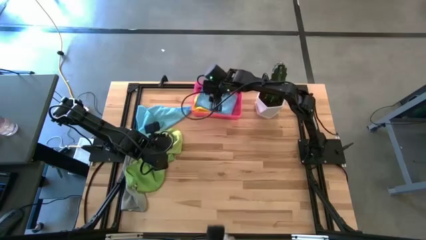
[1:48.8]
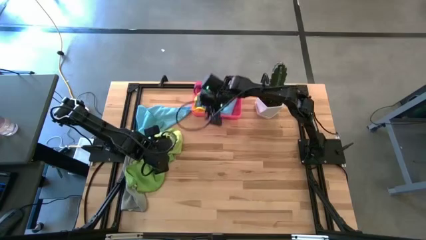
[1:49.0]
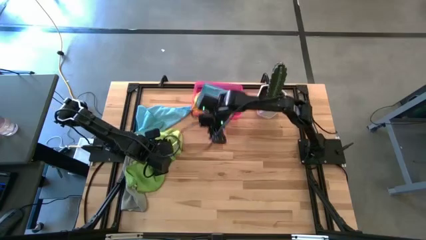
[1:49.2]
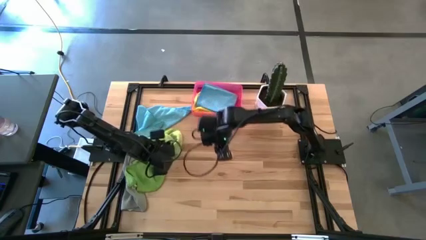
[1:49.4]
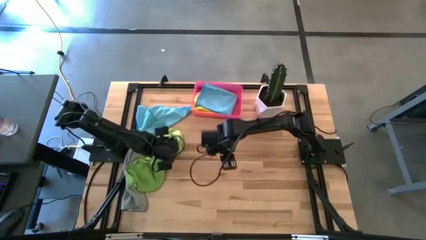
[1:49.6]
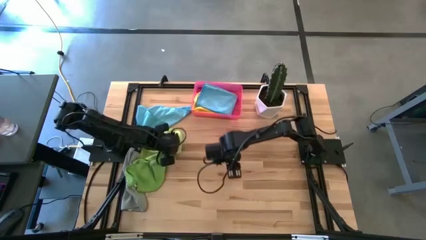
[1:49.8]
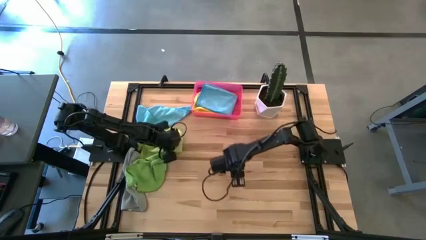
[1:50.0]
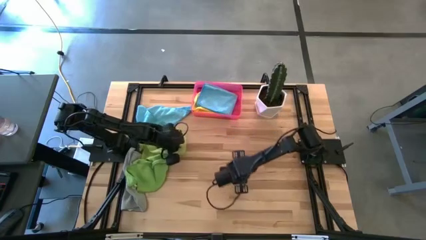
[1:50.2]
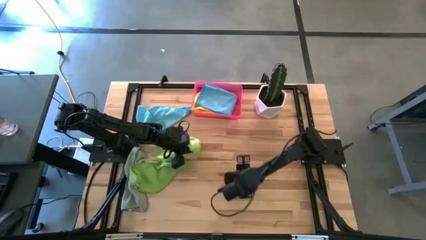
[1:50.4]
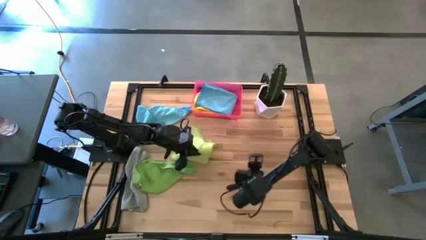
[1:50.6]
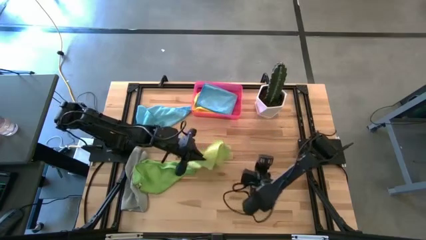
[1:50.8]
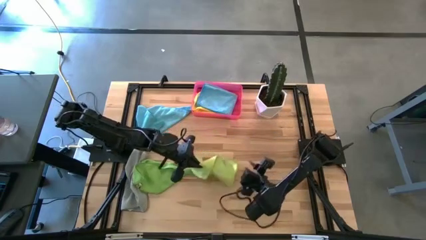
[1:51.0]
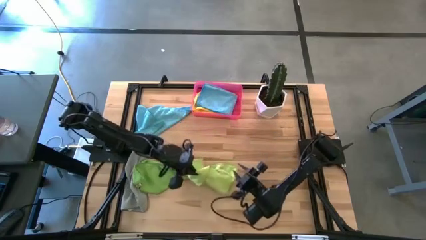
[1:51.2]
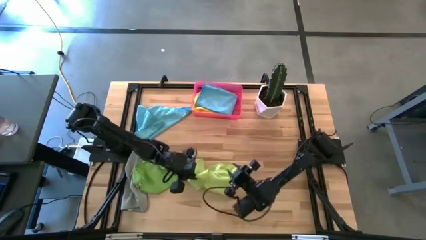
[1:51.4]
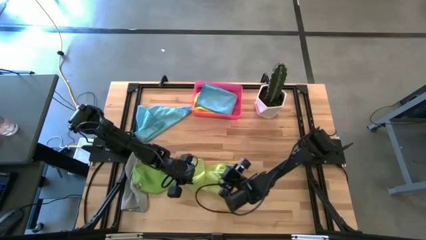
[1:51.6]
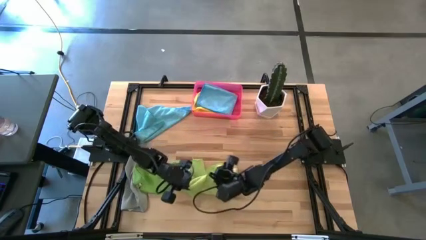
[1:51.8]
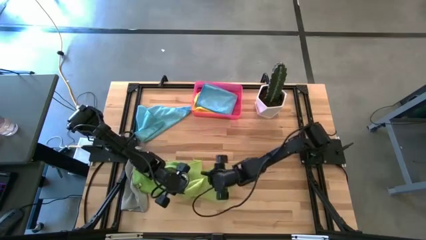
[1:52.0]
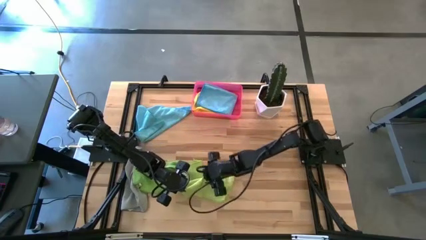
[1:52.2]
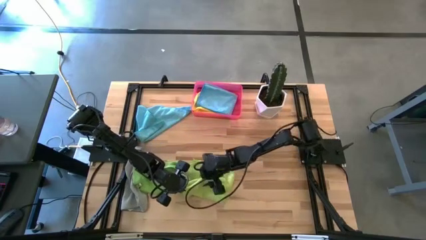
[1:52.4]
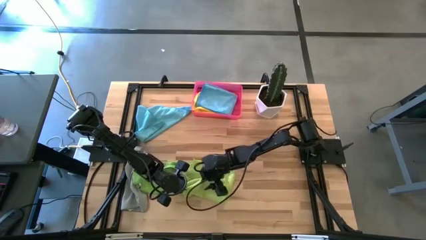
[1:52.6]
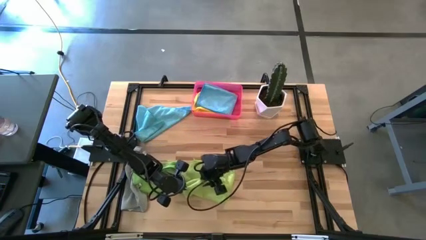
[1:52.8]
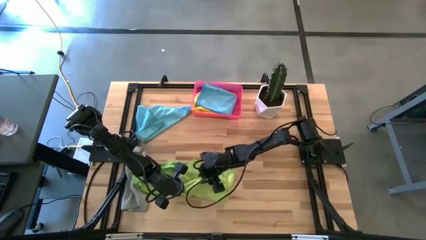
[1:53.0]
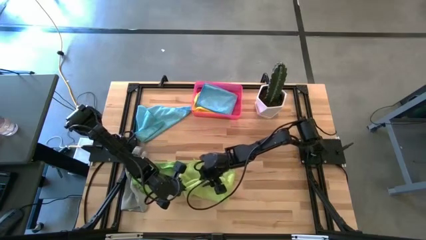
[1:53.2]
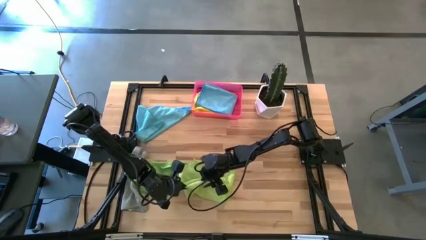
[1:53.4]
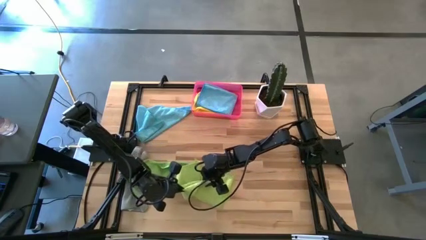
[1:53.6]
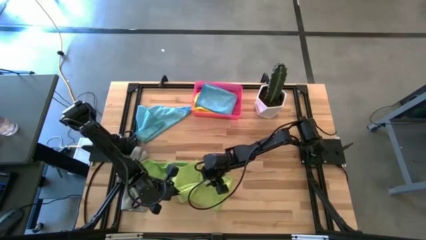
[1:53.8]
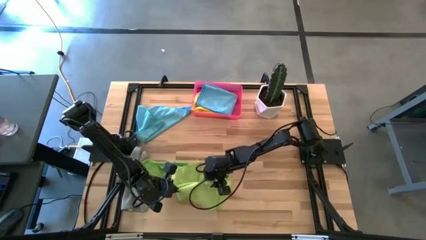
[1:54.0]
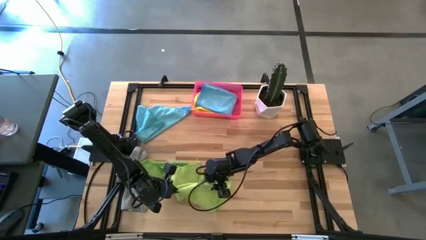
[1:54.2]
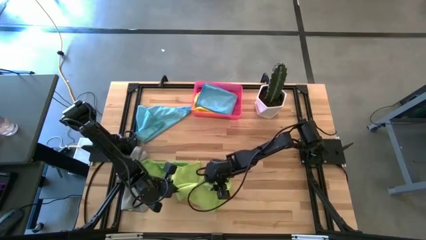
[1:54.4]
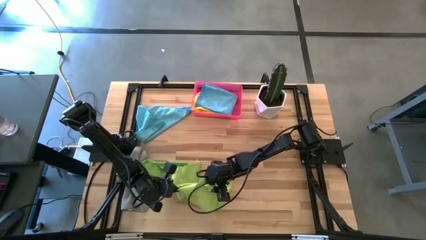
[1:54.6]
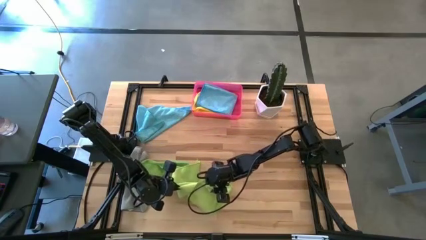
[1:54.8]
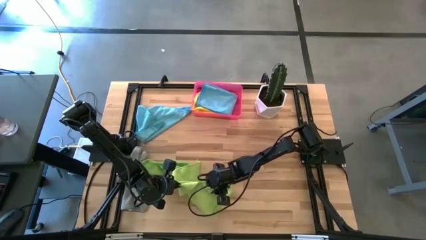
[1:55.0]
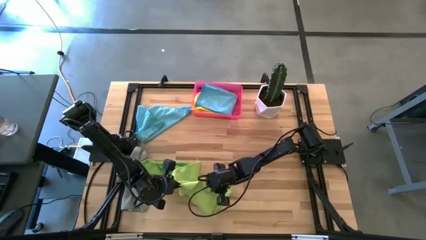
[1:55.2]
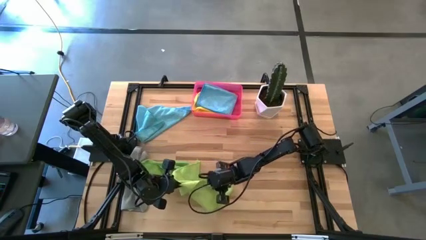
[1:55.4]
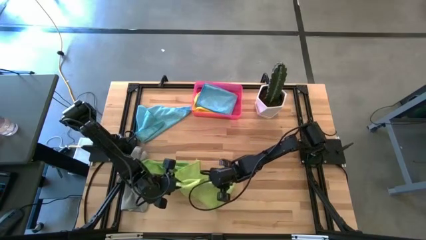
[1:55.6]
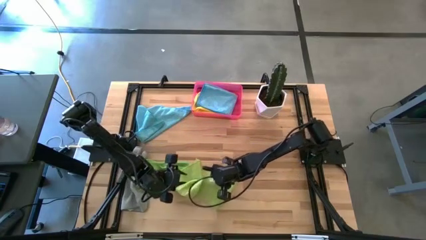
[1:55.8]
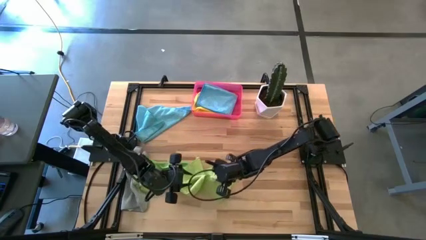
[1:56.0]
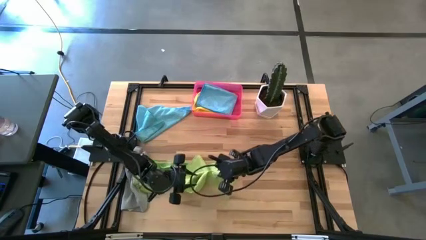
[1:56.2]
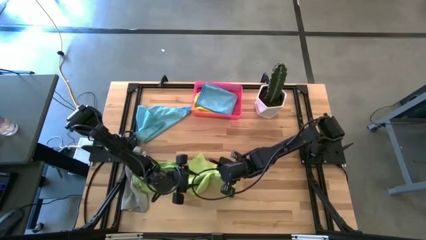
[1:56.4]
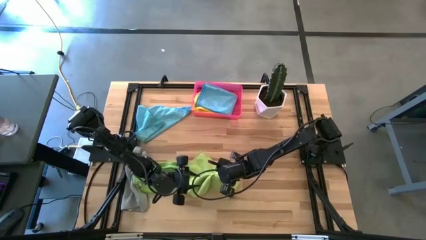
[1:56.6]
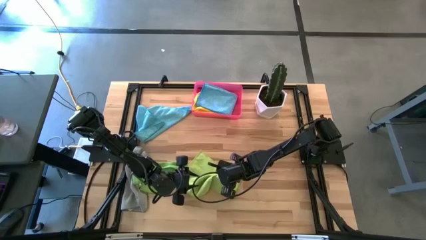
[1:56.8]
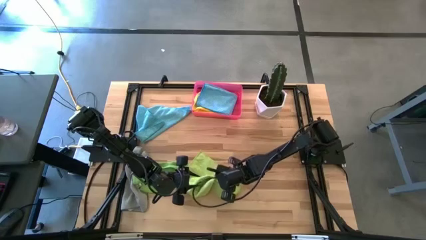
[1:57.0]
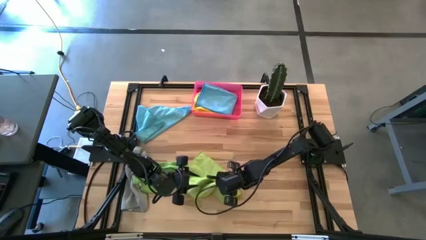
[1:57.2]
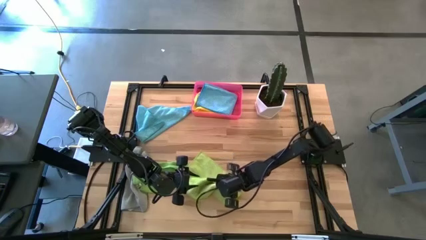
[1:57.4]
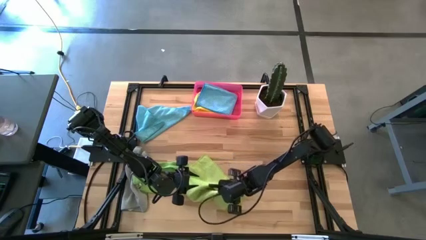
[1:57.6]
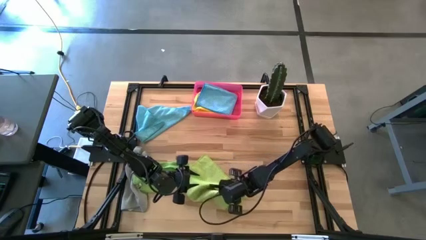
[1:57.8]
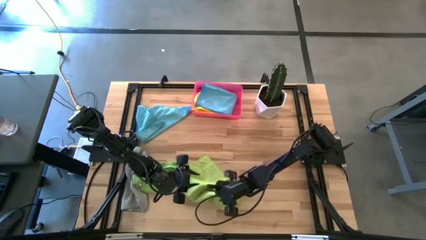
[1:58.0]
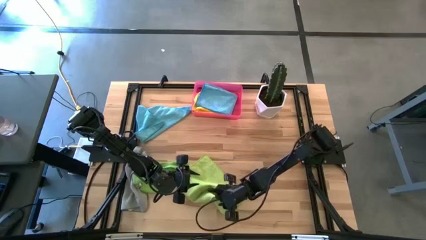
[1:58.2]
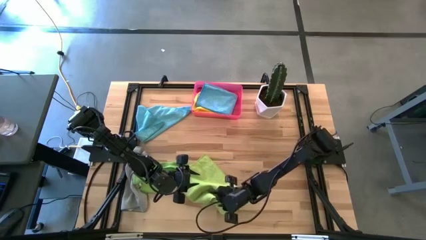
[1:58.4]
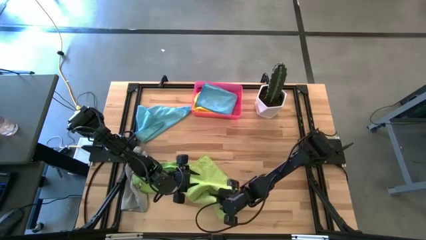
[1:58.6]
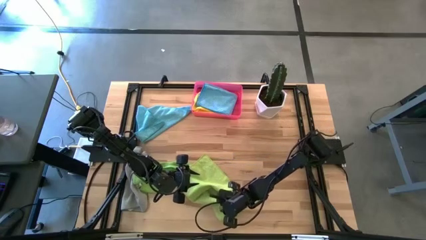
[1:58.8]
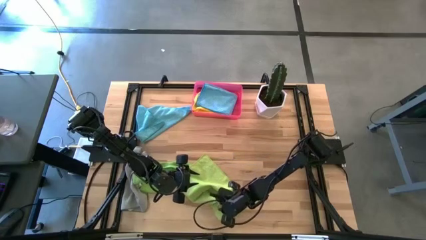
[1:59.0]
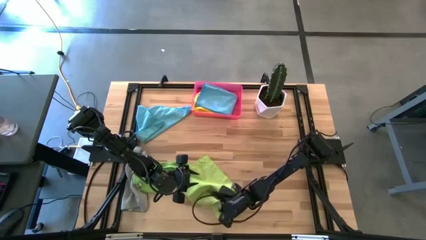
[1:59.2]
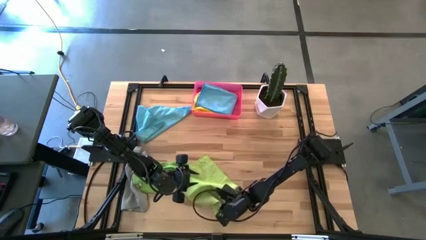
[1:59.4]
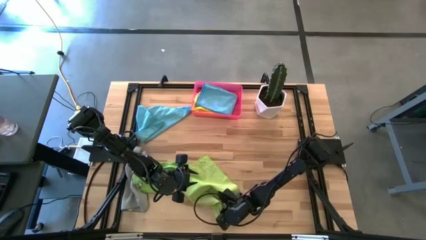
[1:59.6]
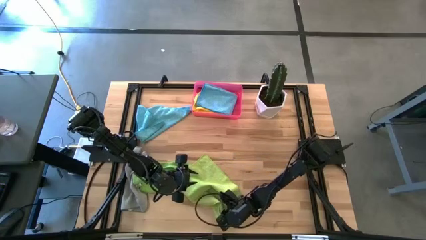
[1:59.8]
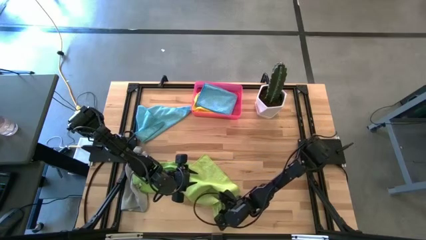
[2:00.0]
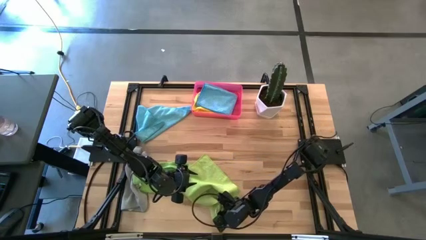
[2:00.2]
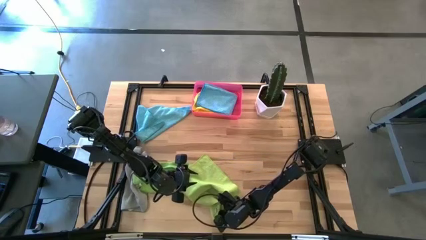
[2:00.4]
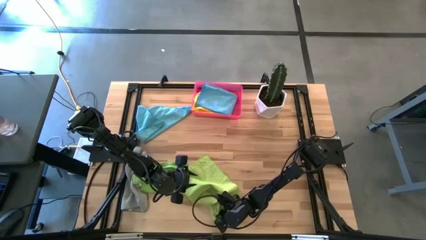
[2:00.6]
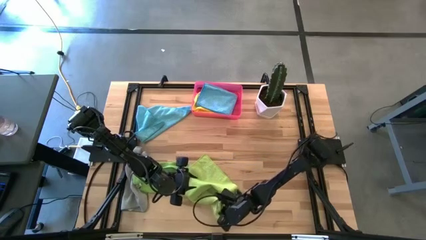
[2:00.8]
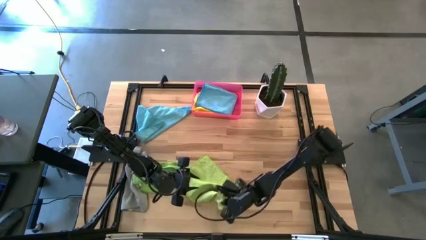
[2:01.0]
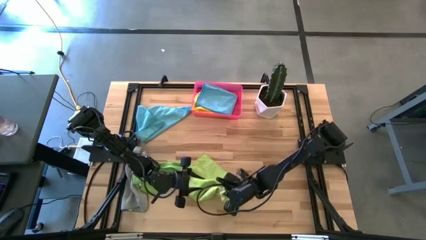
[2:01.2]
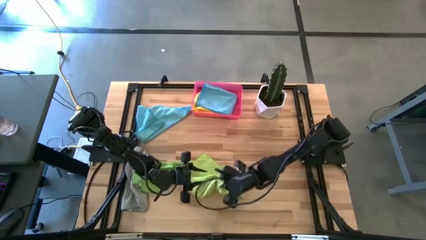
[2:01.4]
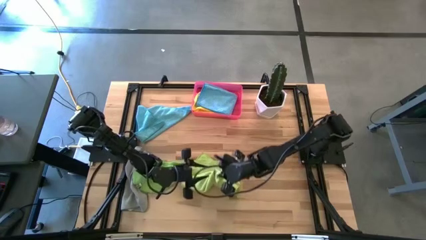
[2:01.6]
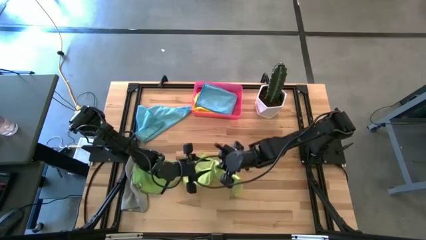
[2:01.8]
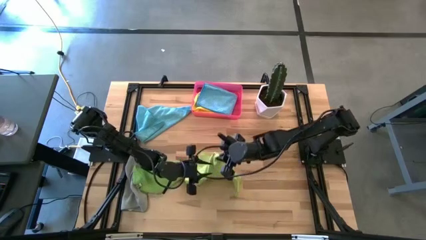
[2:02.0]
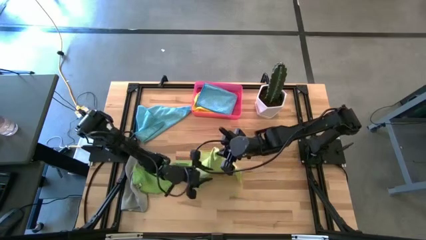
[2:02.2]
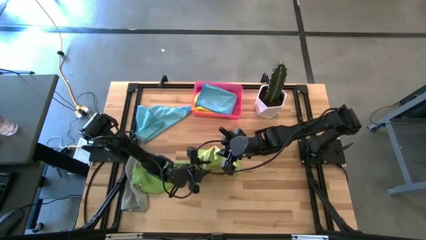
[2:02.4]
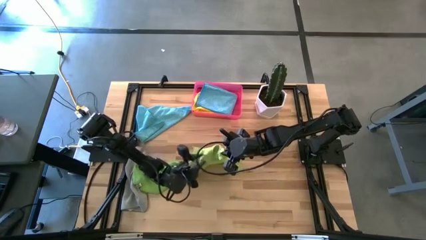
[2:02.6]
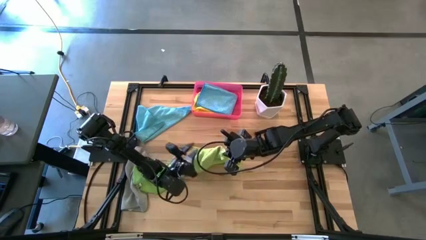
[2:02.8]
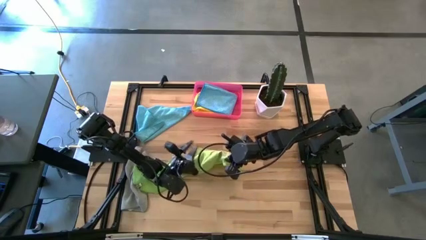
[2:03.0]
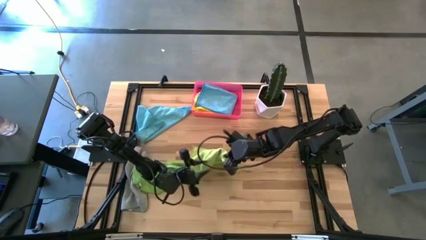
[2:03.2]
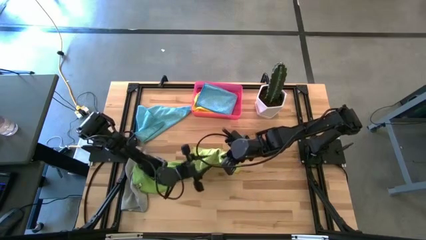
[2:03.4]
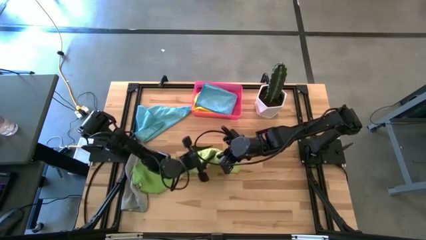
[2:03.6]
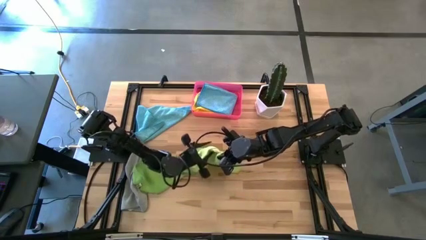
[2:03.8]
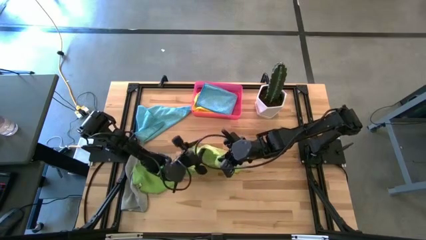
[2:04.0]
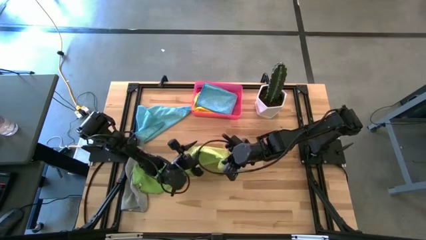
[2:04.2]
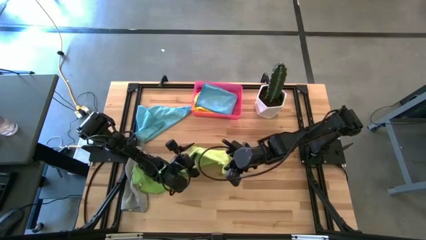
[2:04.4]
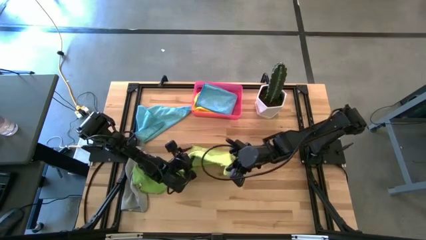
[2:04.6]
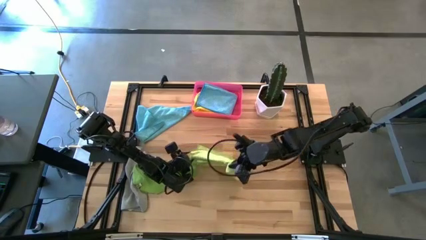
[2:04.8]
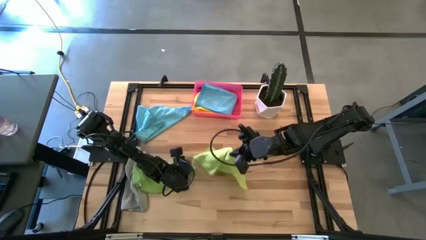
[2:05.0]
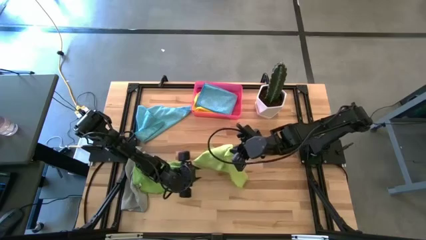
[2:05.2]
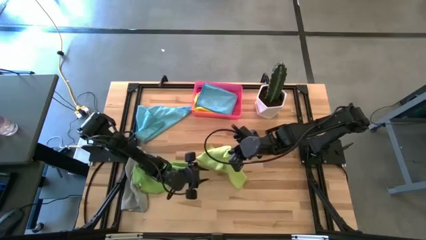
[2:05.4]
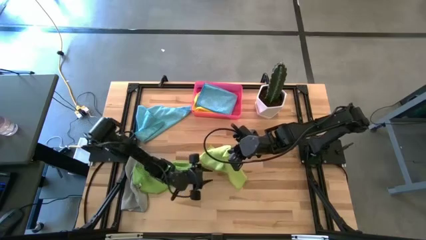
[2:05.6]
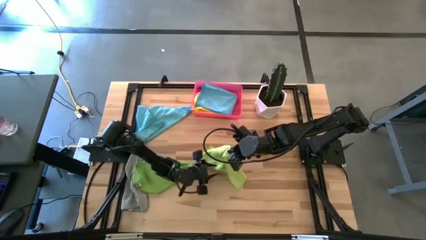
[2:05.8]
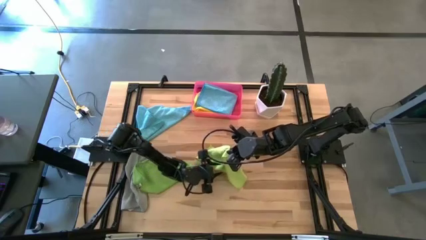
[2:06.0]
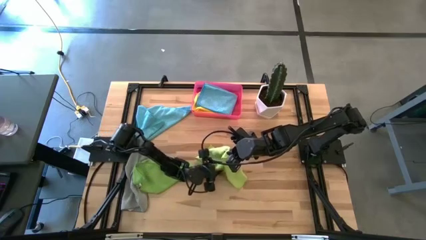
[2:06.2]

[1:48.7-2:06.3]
Task: Fold microfiber towels
Fold the light green microfiber cloth on the table
